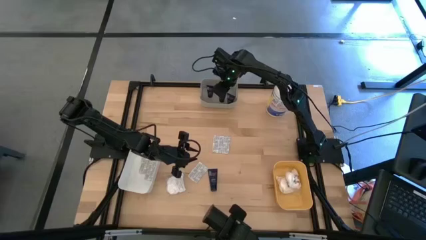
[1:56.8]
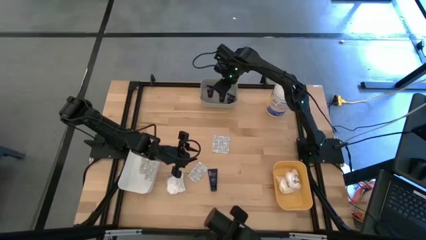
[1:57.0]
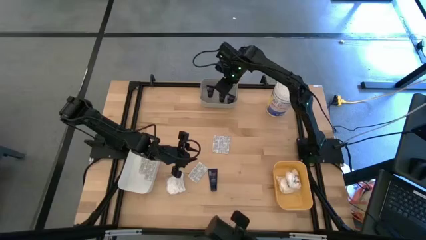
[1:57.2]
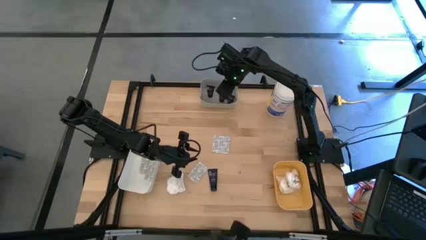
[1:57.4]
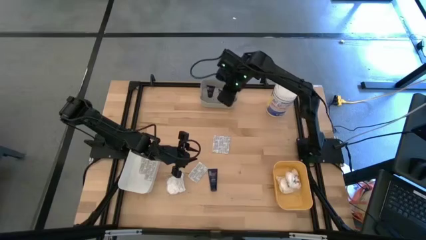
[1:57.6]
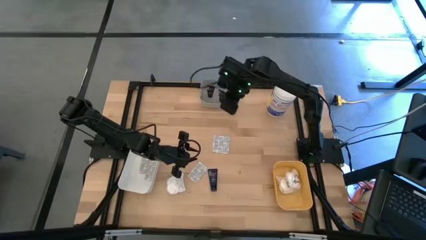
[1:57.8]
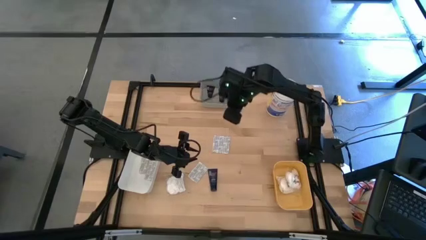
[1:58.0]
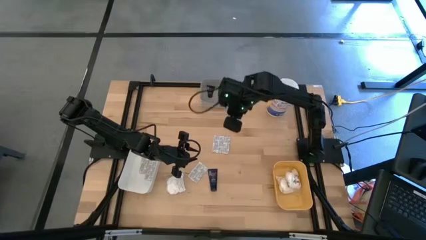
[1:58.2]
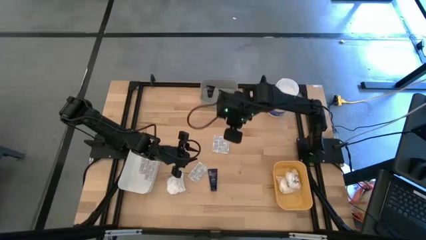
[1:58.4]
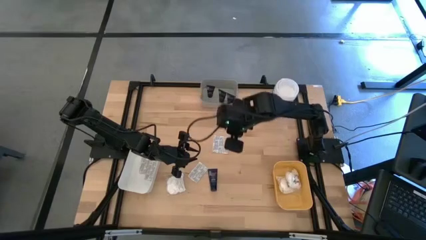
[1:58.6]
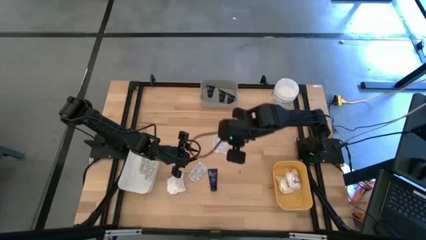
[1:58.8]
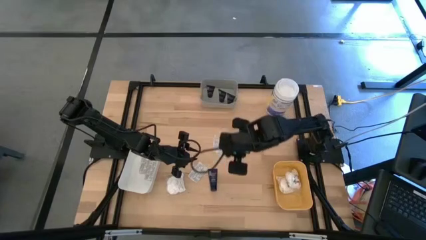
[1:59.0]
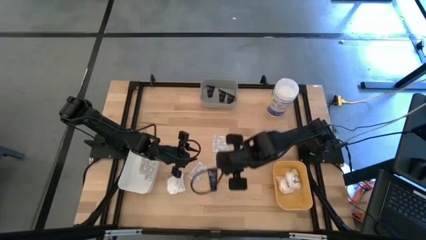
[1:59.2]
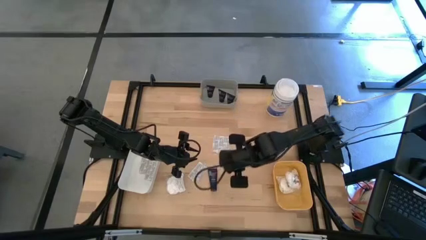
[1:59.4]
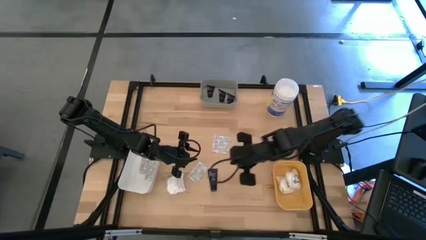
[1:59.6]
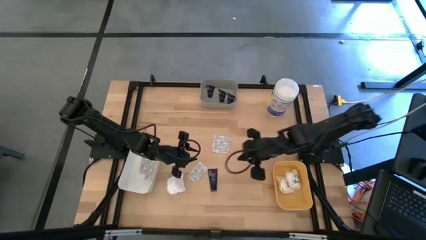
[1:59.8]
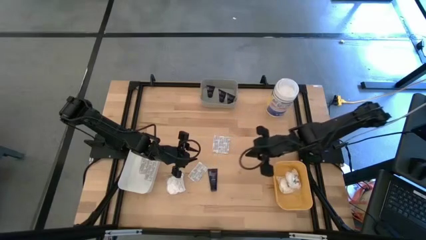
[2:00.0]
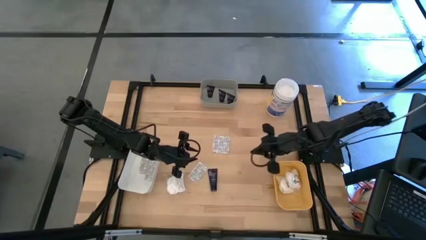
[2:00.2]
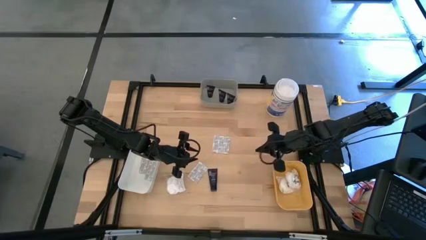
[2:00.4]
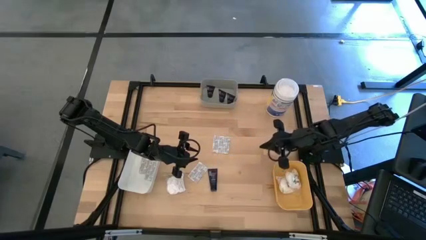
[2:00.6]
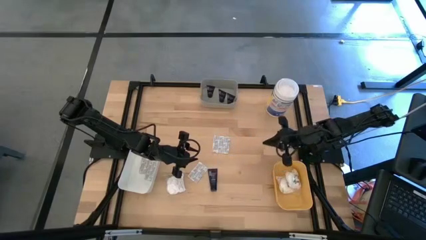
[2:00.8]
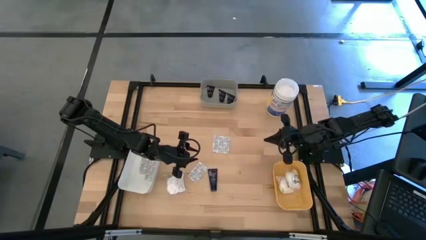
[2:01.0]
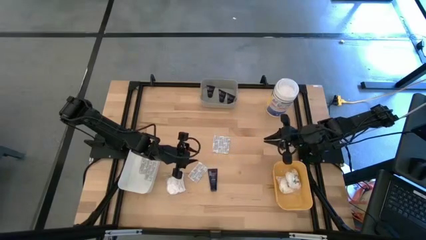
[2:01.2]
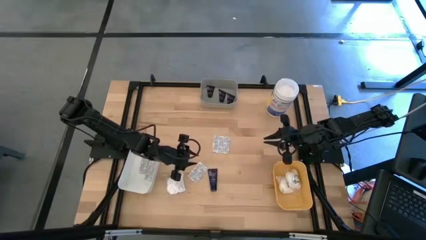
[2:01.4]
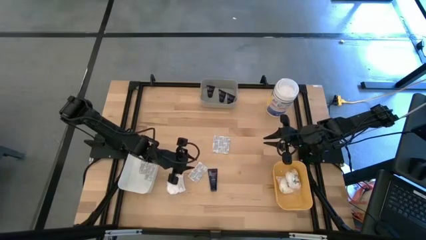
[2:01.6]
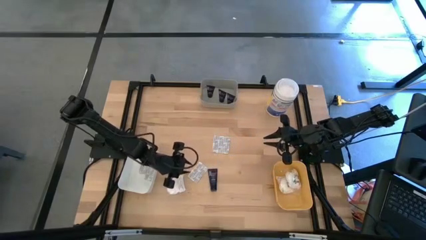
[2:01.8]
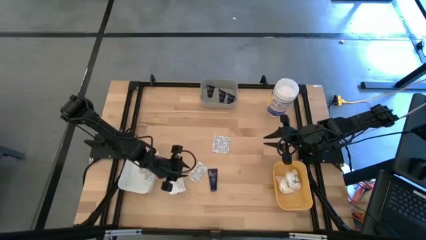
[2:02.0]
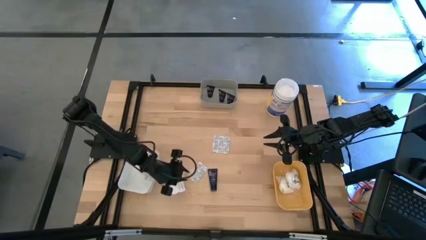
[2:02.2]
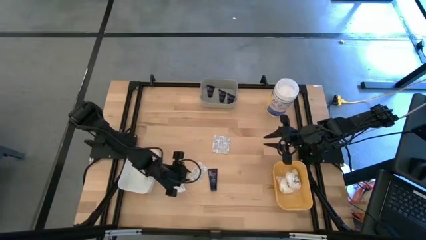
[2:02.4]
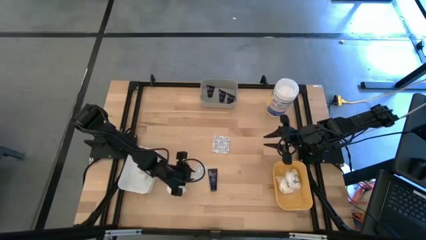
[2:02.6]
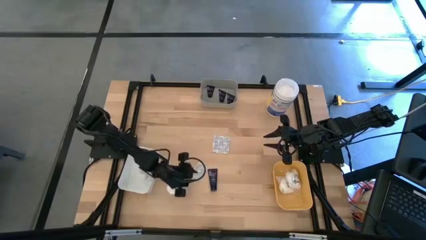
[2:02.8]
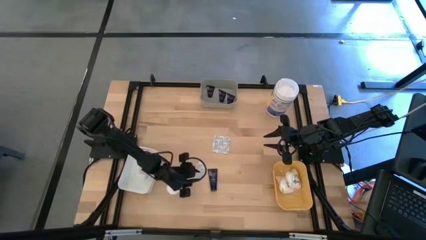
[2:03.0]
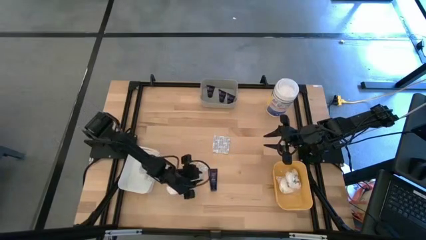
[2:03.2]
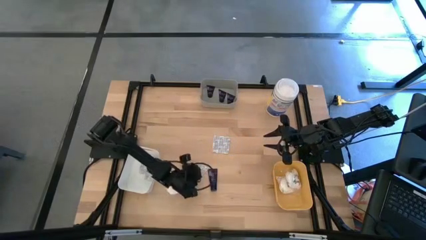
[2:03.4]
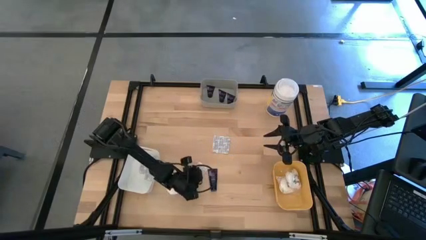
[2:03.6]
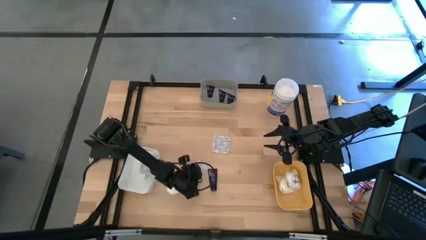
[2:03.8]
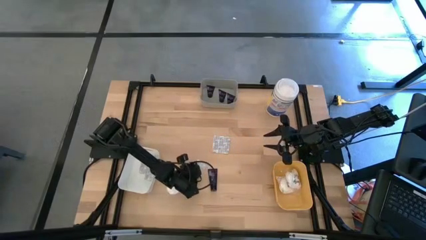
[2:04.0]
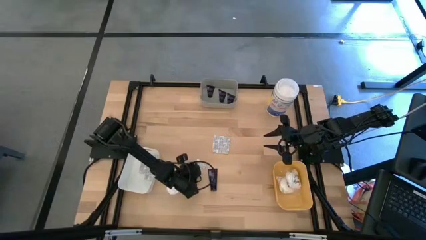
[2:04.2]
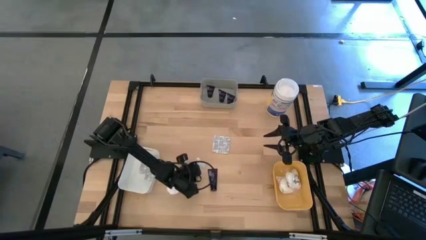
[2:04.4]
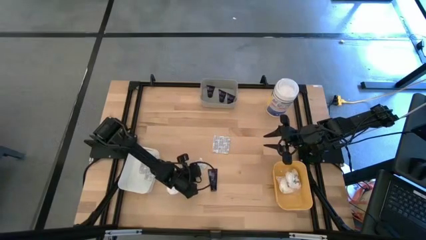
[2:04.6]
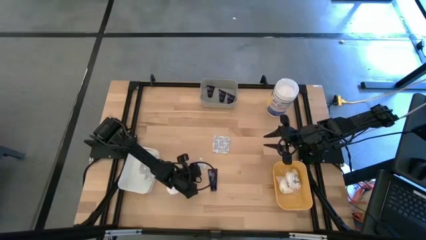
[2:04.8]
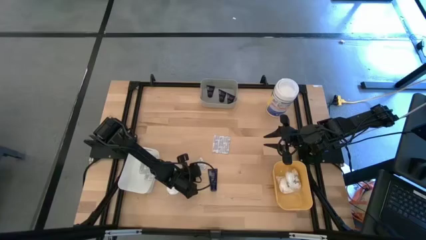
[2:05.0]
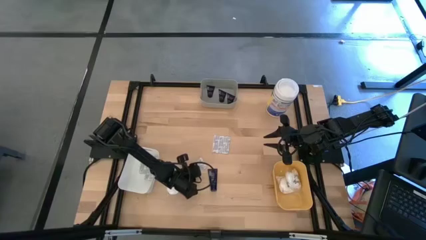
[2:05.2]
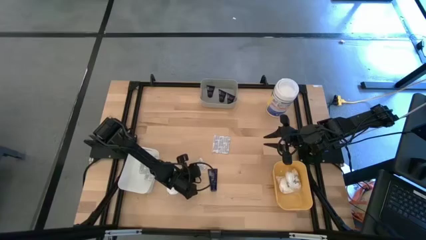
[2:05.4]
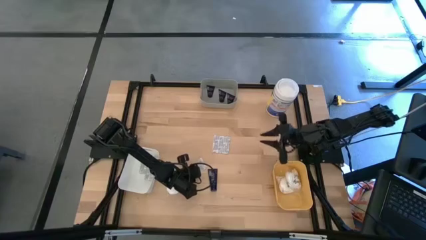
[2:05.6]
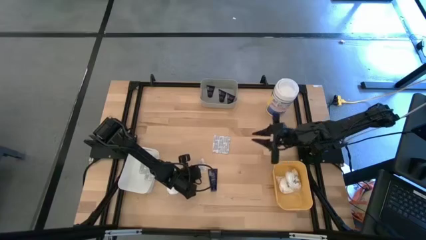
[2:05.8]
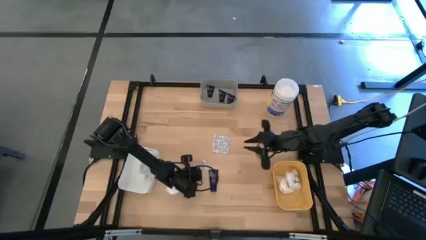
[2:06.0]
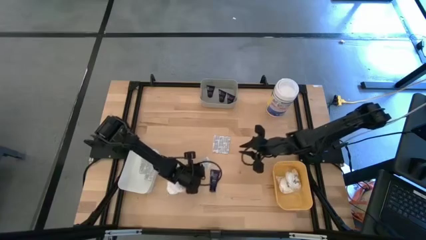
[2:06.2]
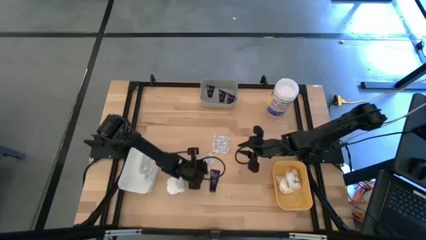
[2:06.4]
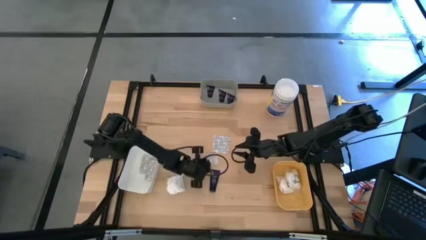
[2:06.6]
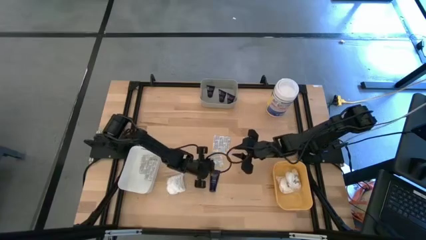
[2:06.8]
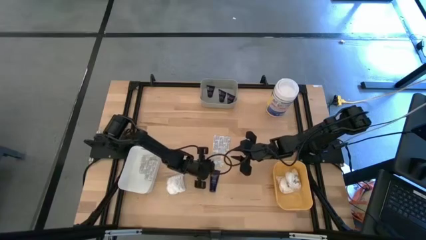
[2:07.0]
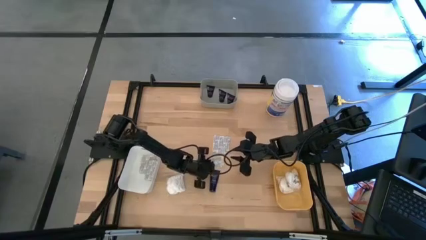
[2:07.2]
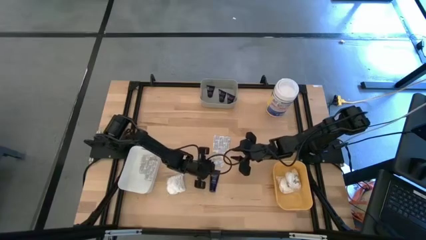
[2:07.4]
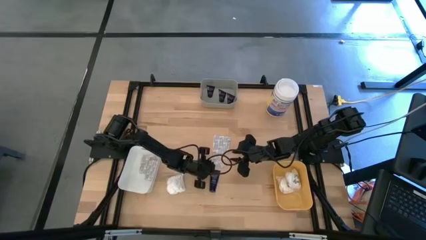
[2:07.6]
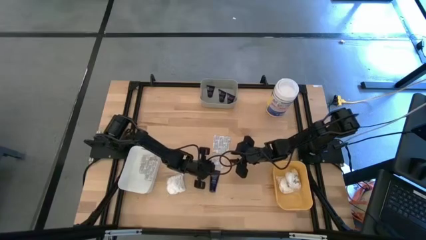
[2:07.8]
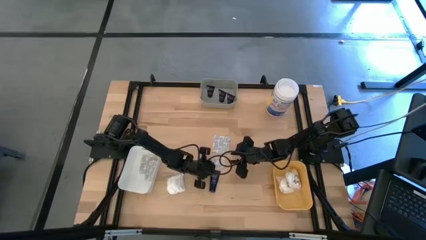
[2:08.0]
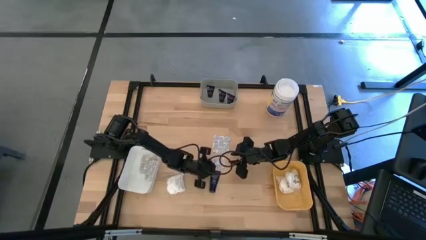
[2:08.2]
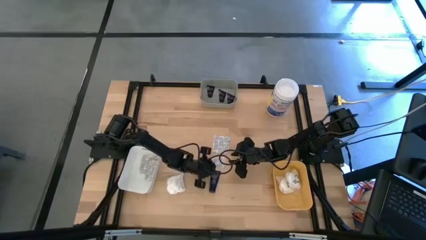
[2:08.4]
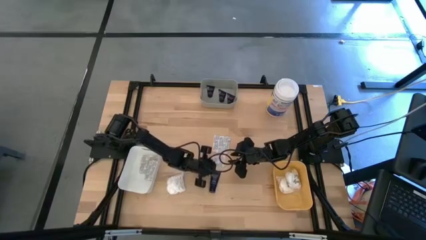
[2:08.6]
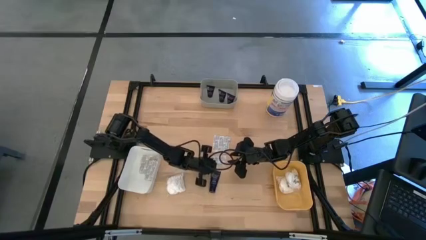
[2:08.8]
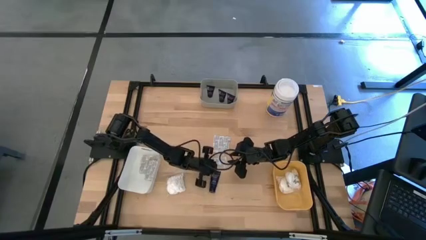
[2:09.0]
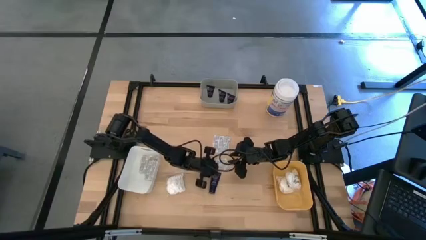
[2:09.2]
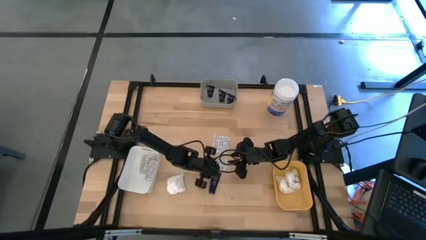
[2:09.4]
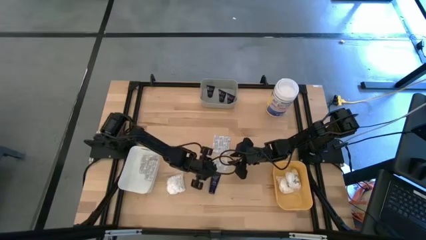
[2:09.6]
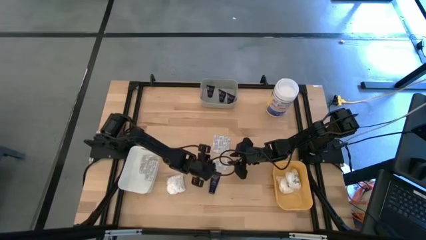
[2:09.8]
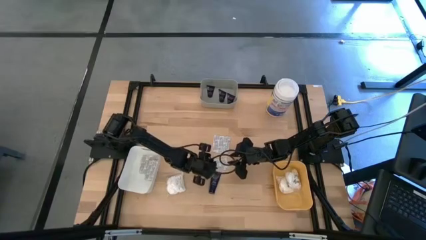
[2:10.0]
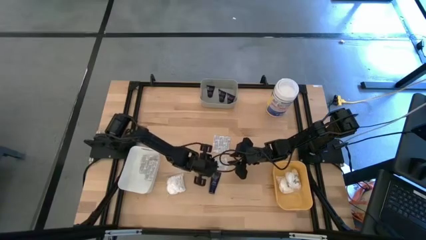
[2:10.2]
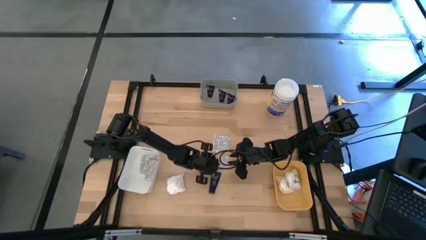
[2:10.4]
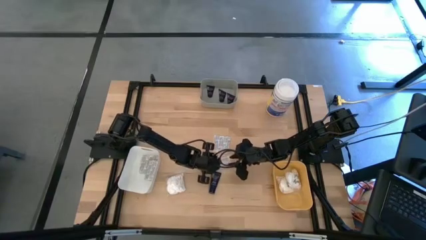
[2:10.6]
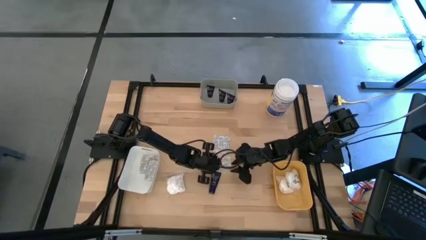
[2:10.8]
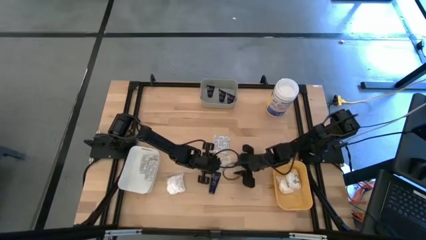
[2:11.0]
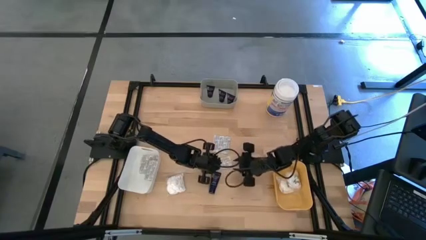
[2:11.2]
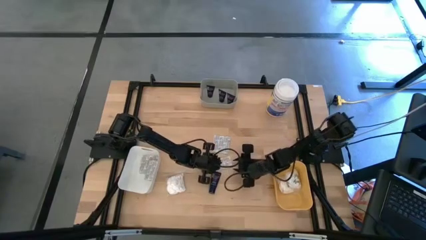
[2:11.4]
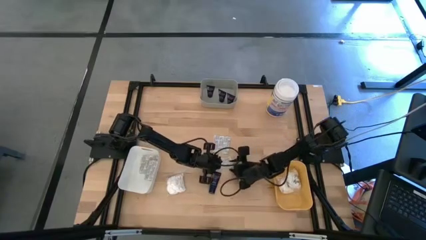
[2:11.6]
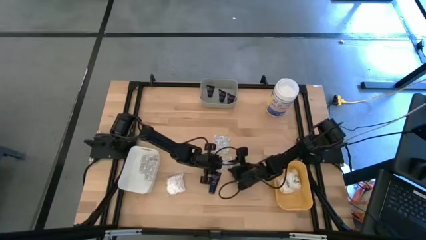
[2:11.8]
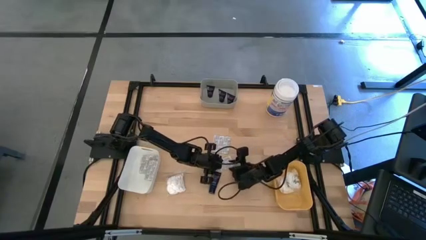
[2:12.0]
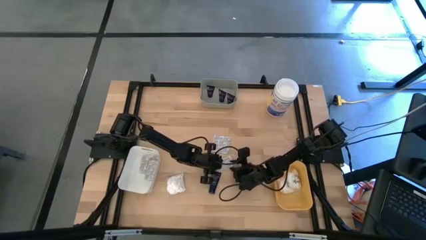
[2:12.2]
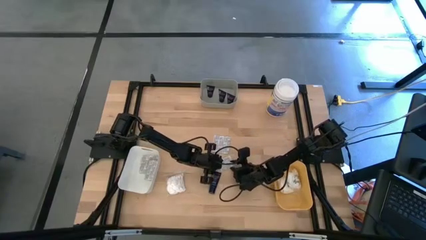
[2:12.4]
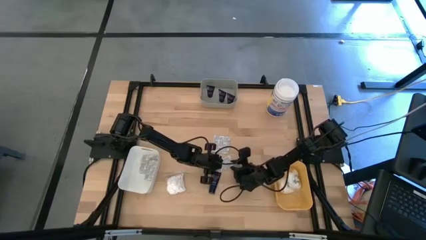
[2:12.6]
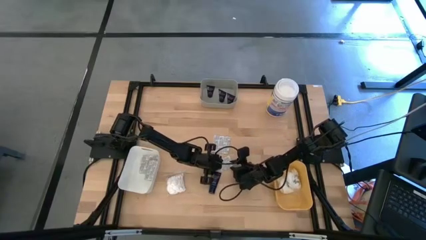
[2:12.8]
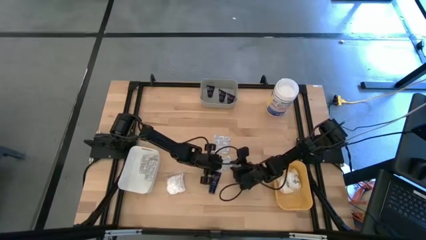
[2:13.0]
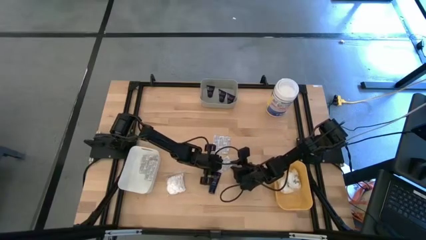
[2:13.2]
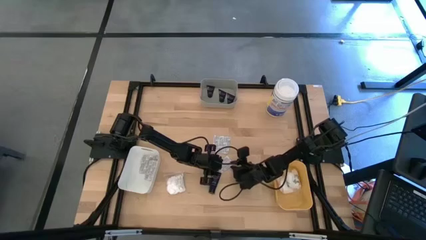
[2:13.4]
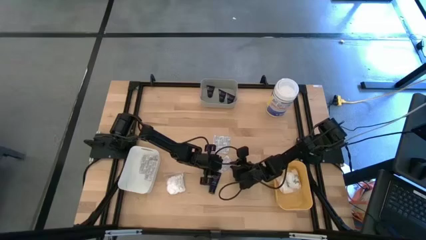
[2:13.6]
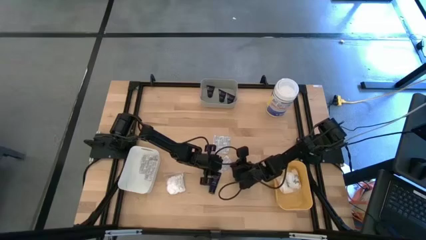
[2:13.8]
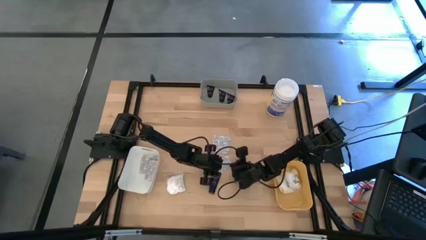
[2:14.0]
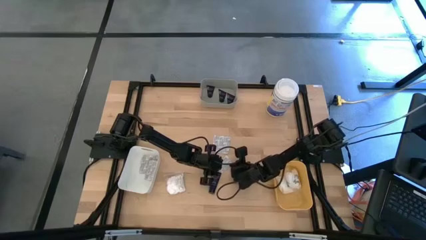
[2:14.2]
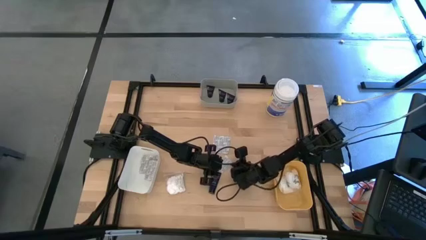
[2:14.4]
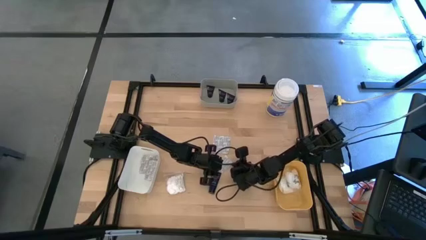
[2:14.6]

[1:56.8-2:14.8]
Task: Pick & Place Travel size toiletries
Put the bandage into the white bin
